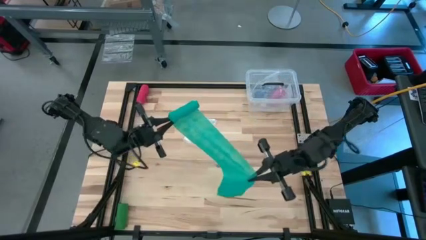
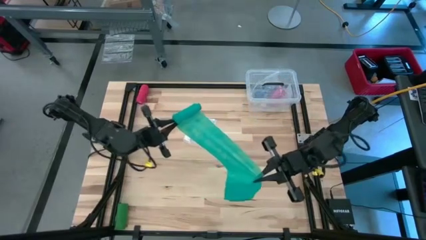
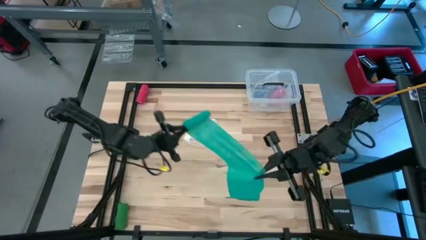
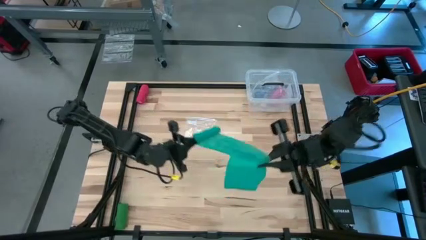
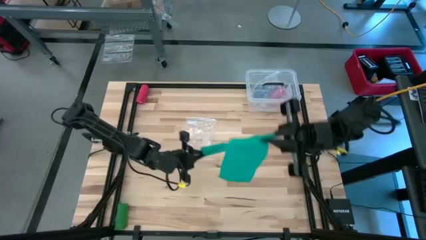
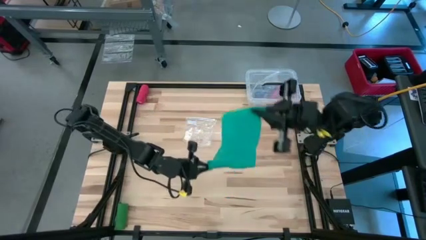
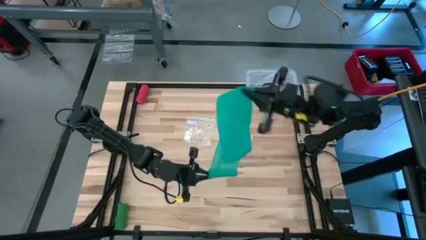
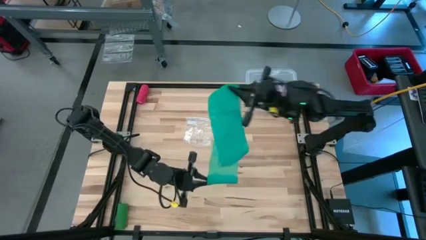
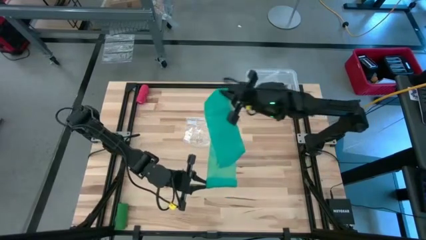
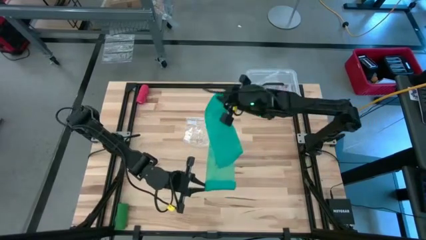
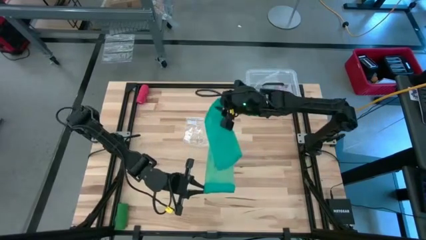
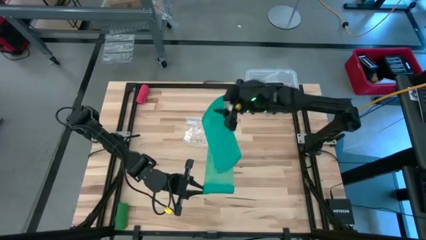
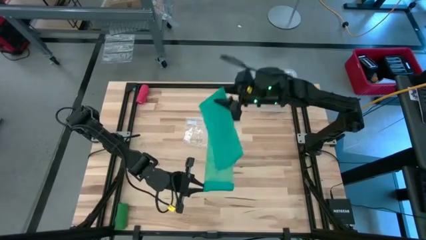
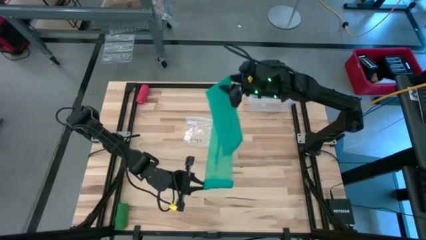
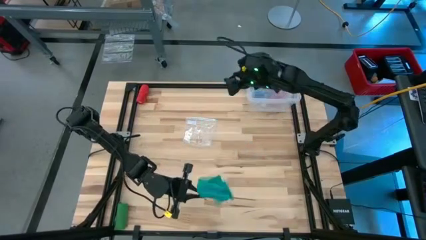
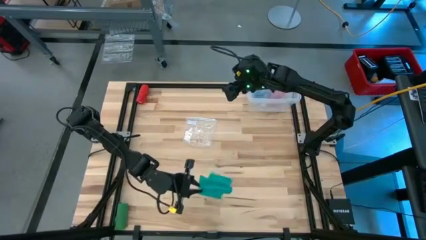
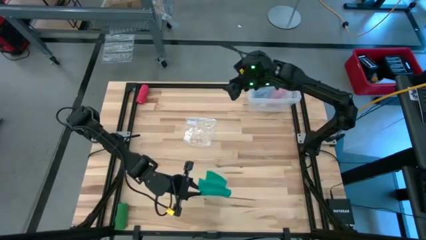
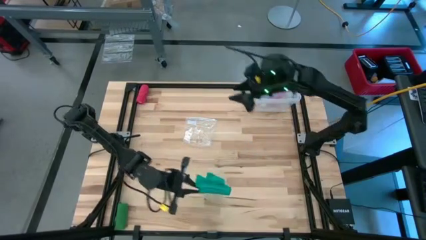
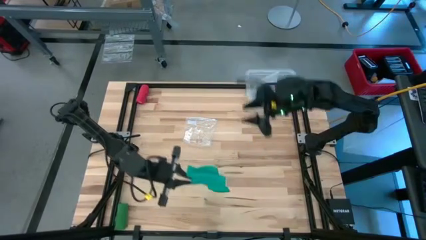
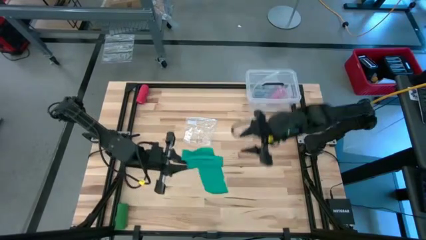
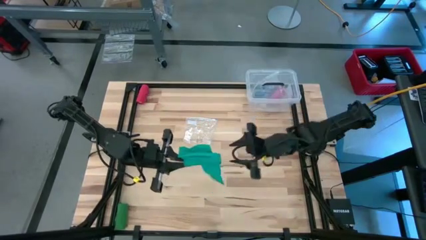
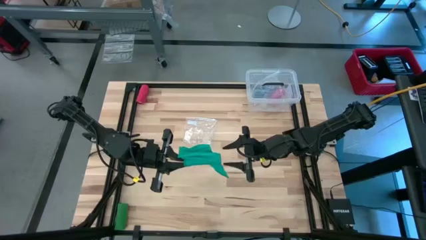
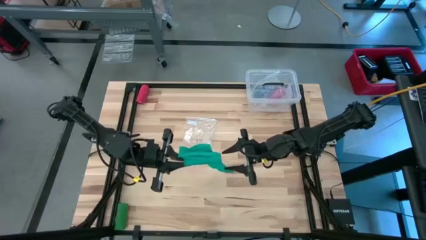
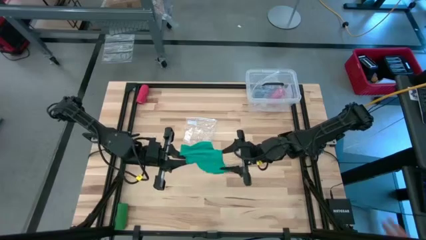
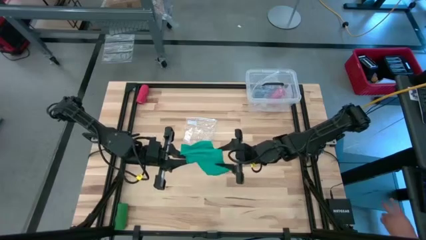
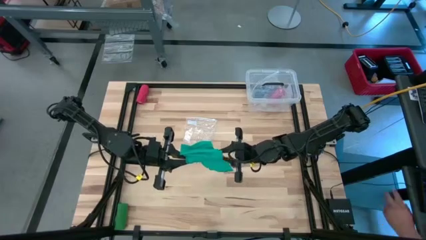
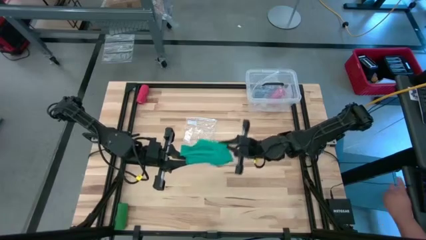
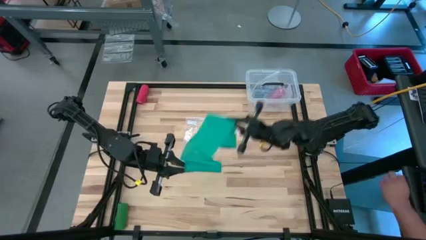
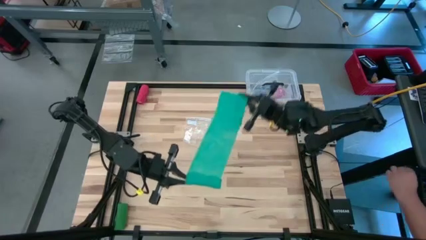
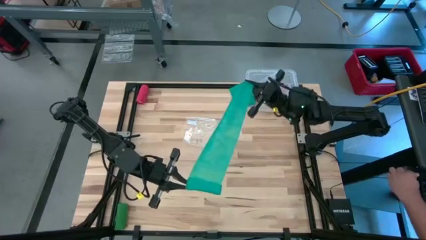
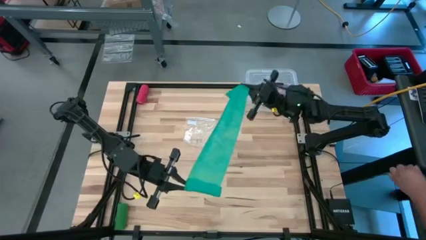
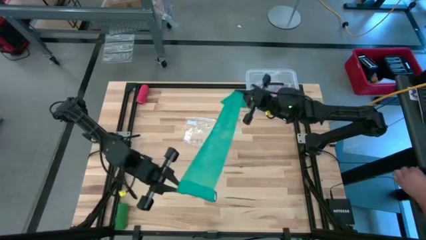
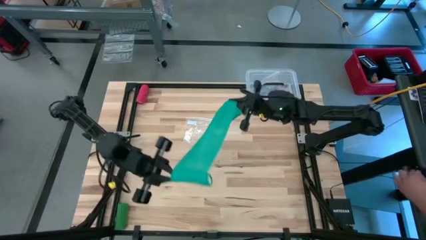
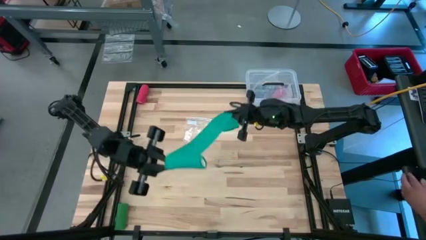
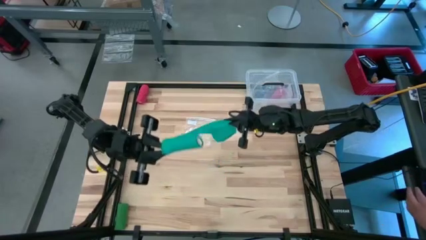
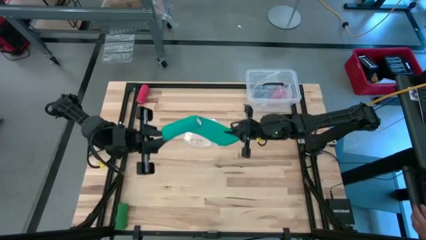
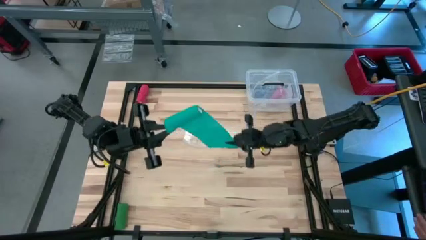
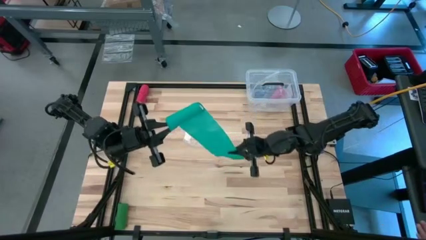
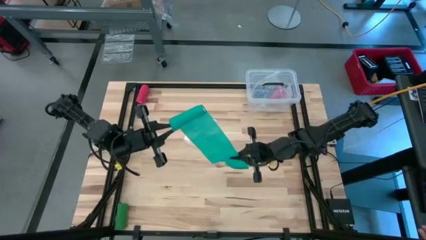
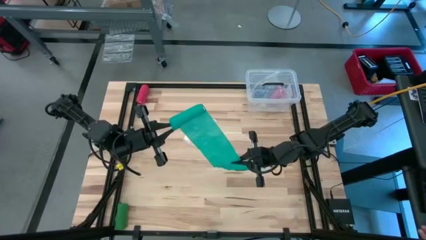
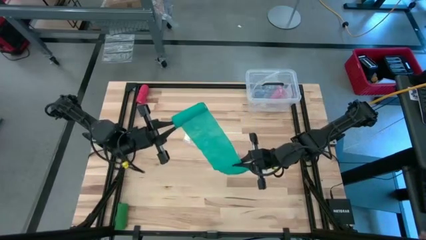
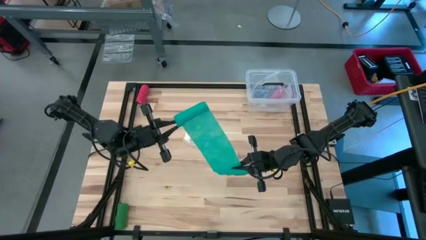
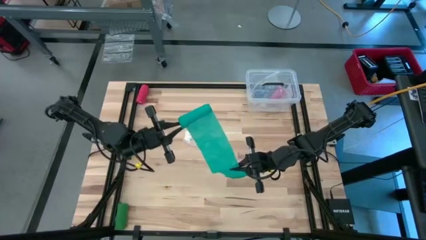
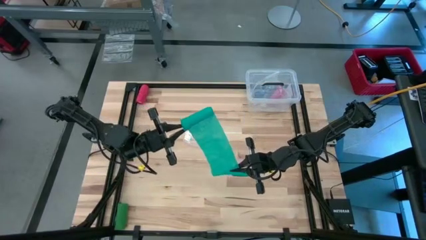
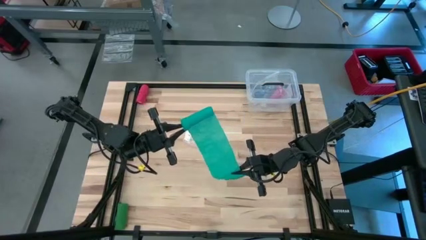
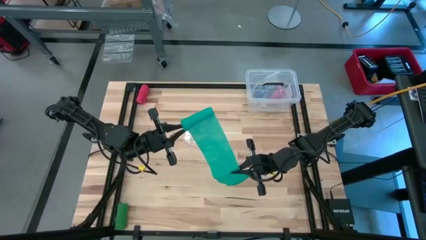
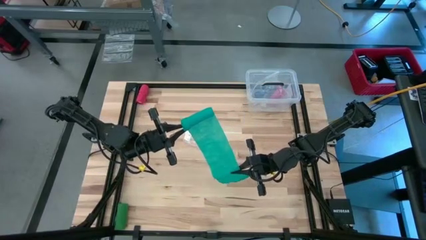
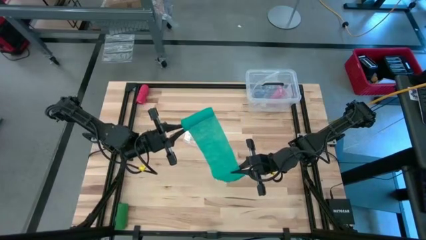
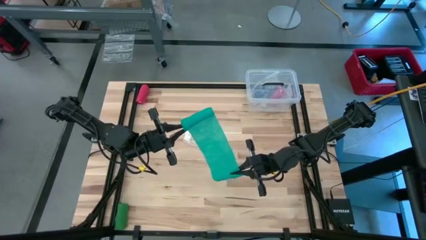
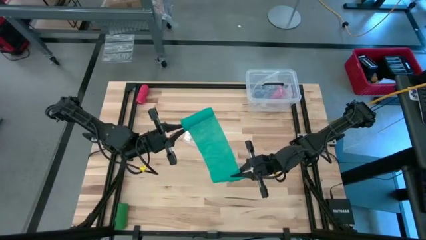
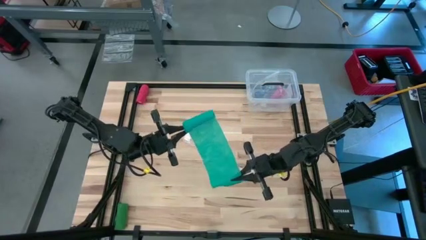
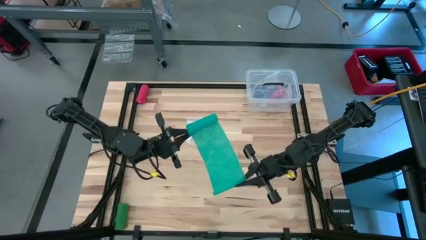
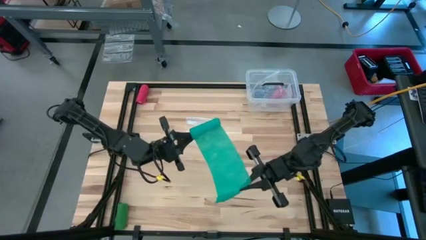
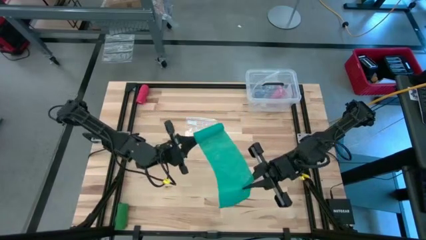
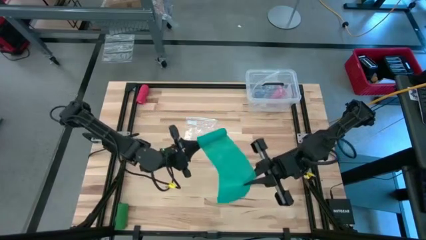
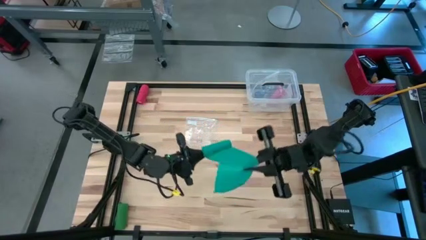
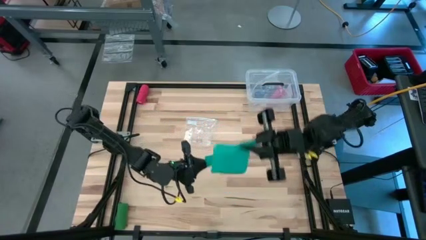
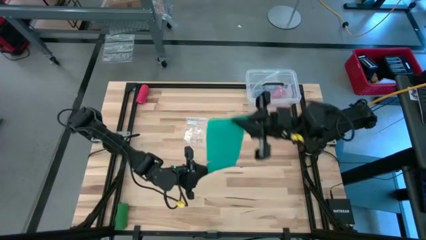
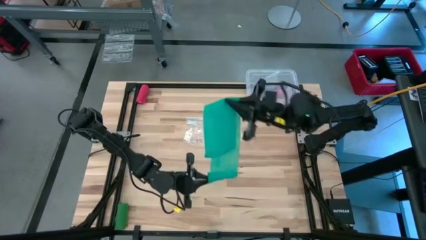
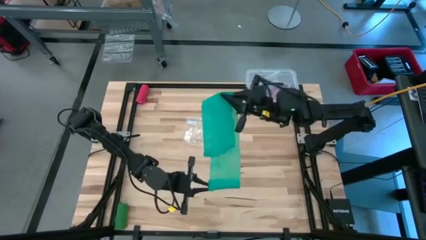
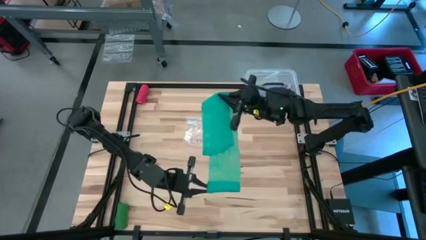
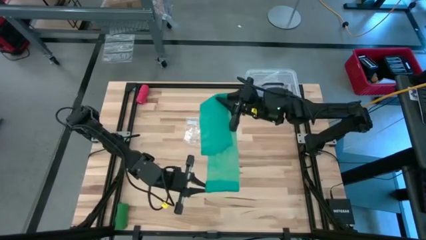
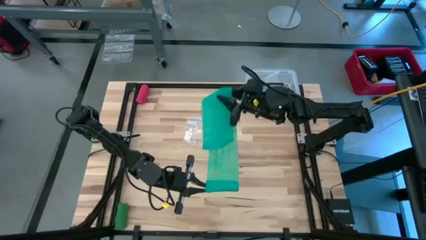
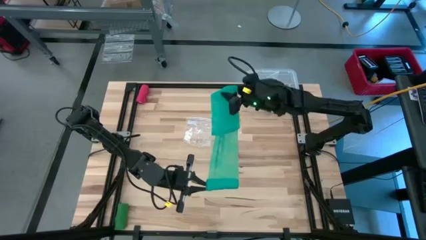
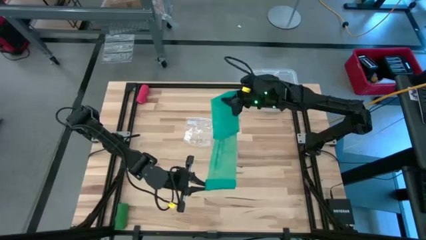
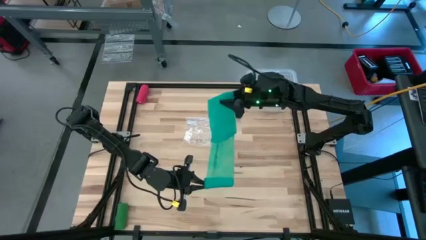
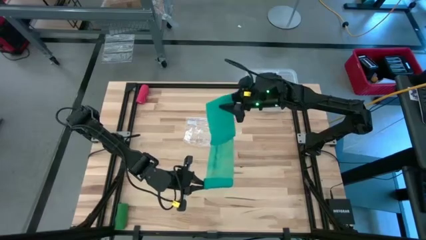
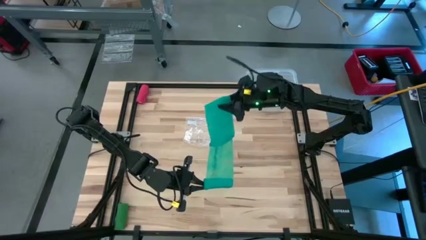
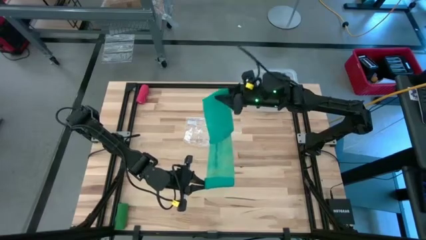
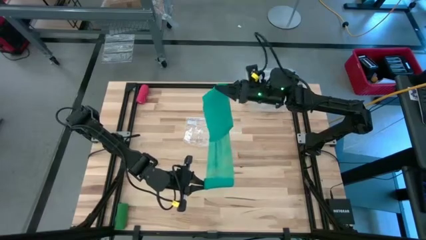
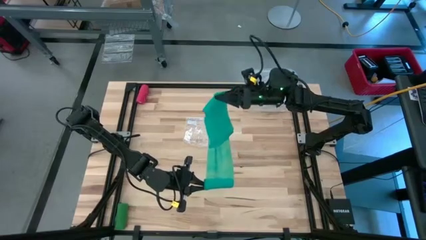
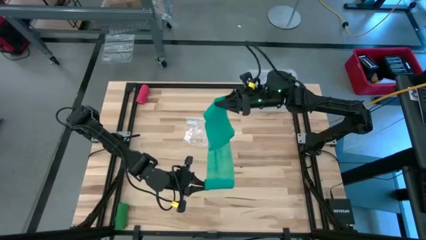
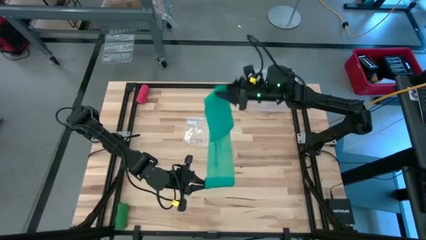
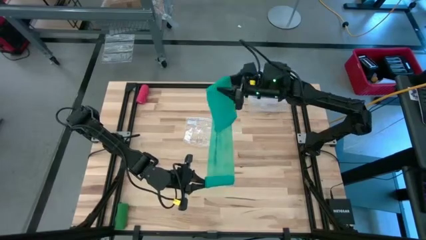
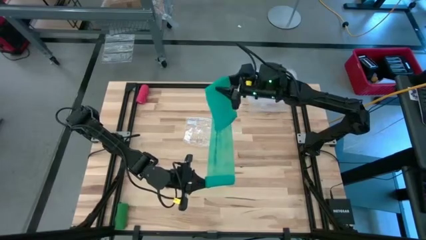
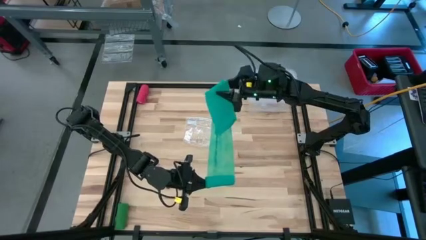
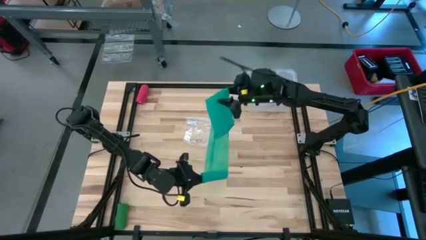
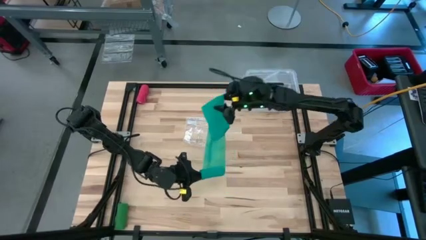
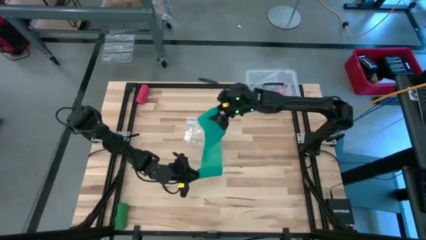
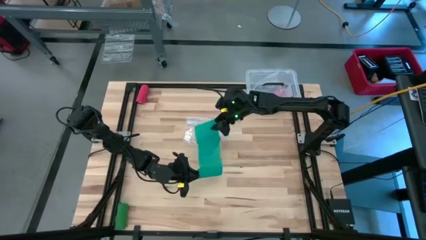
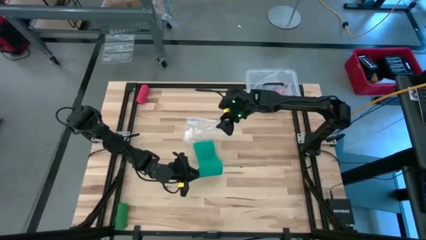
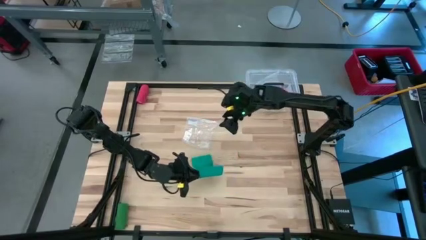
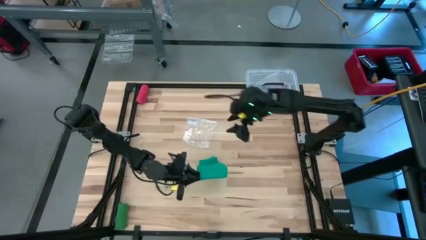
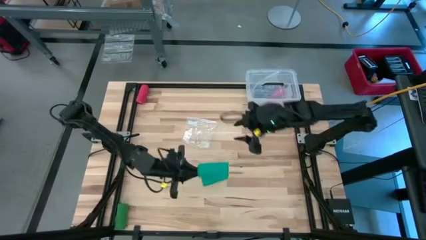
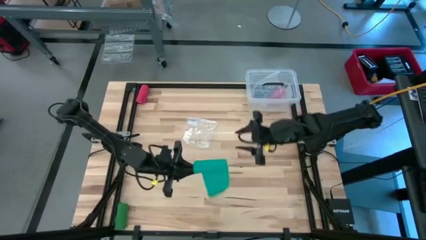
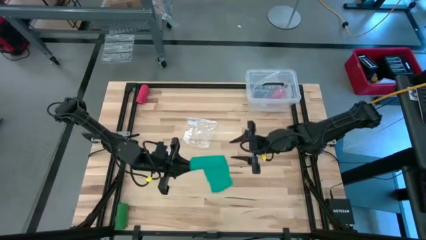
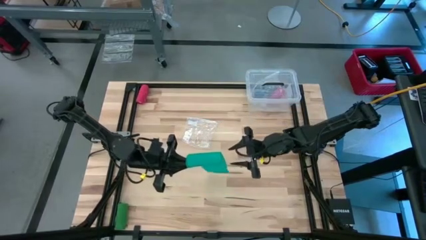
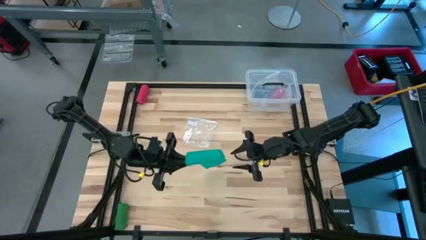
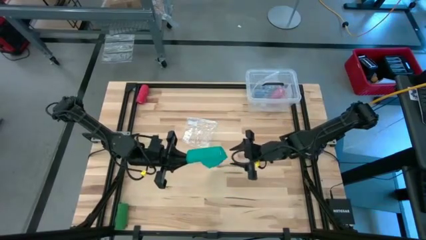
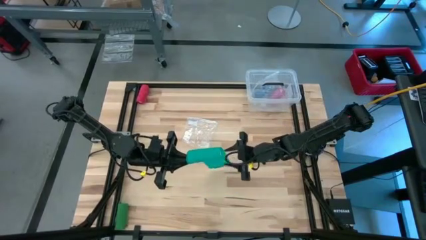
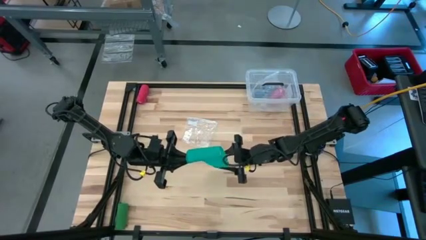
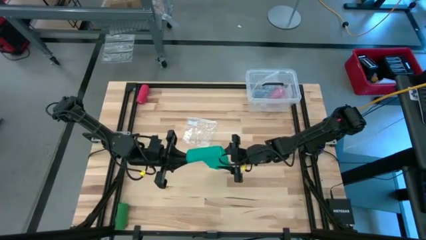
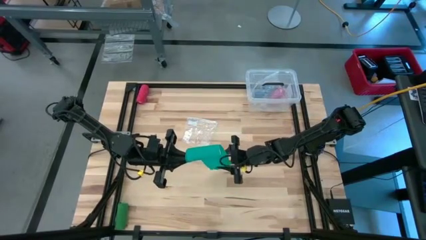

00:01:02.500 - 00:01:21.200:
Task: Roll bandage
Roll the green bandage
